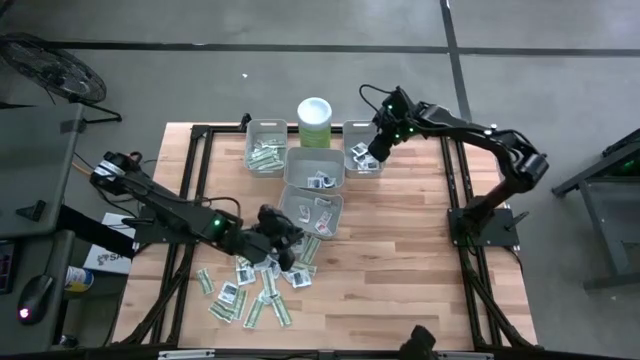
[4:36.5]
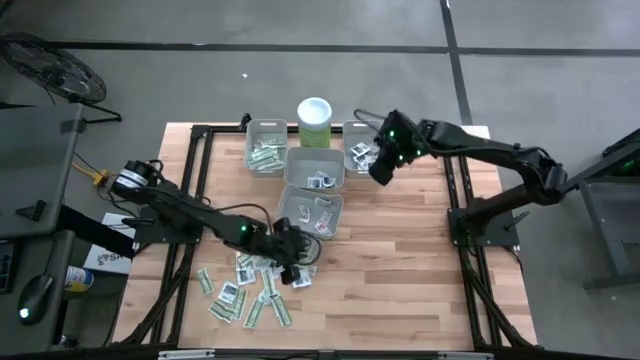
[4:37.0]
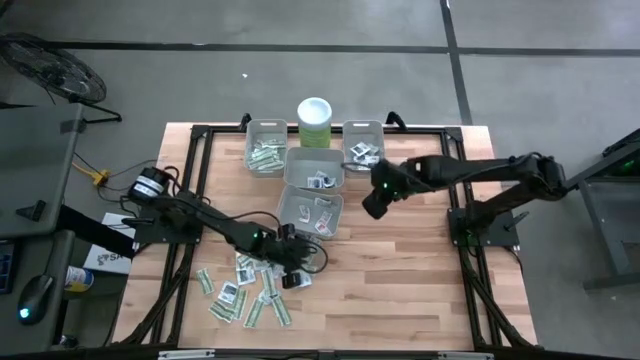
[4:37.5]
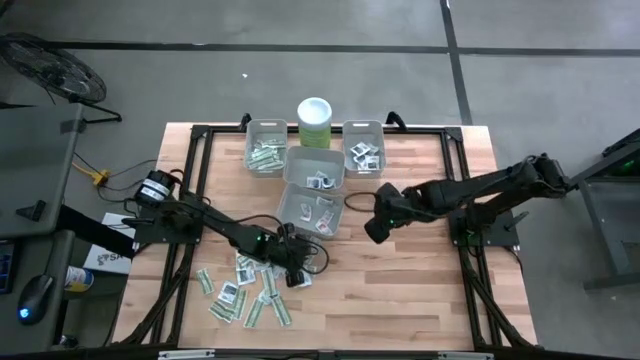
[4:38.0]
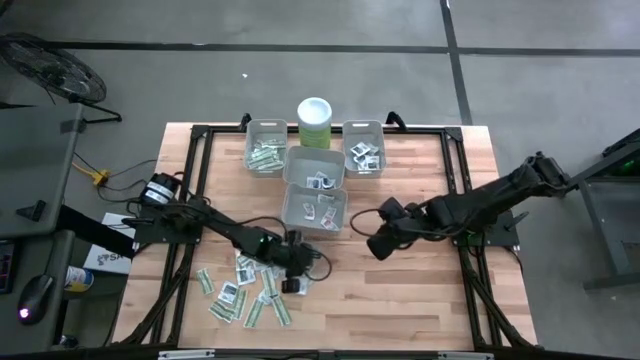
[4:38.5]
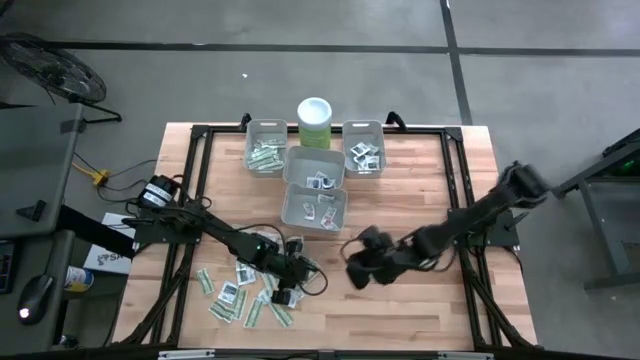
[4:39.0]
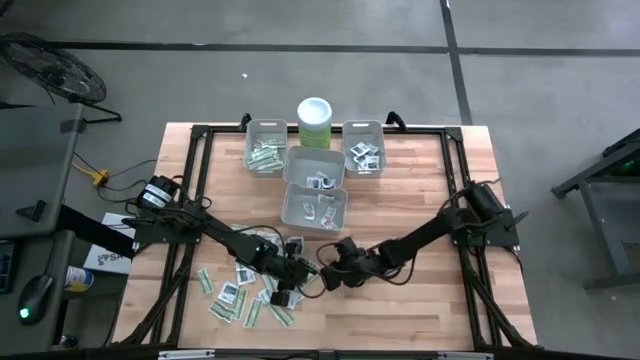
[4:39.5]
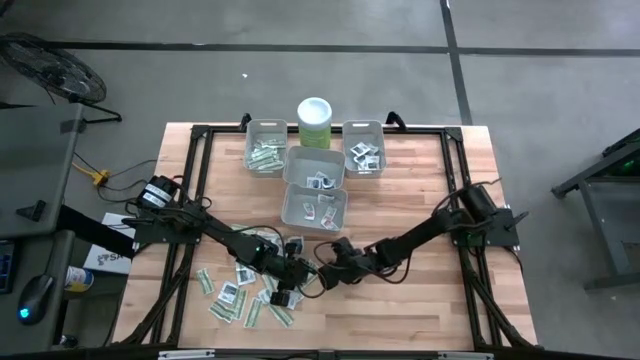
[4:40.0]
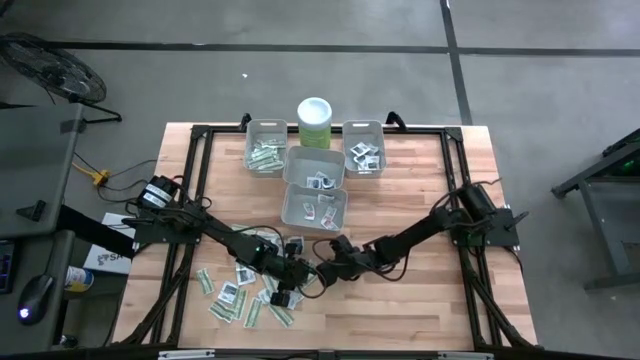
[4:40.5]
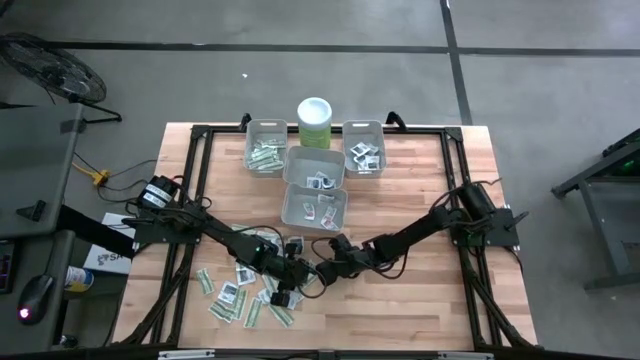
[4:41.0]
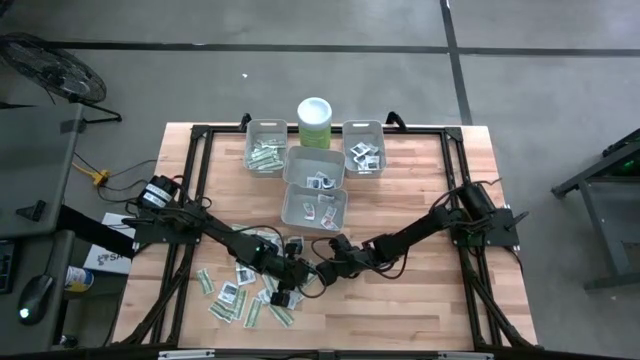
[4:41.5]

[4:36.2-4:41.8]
Task: Pick & Place First Aid Supplies
Put the bandage pack into the left bin

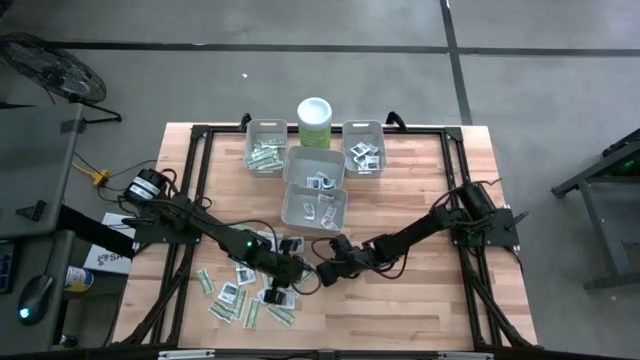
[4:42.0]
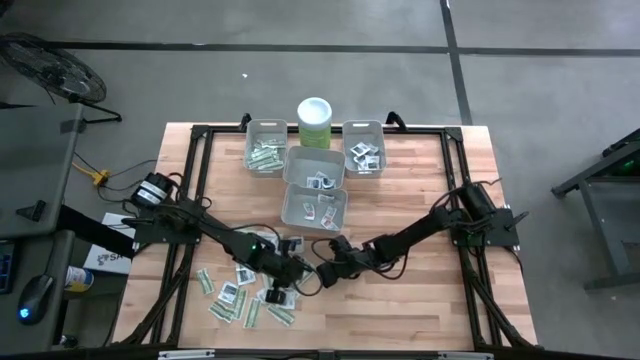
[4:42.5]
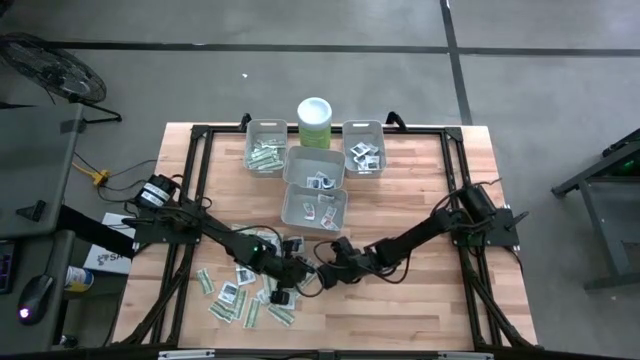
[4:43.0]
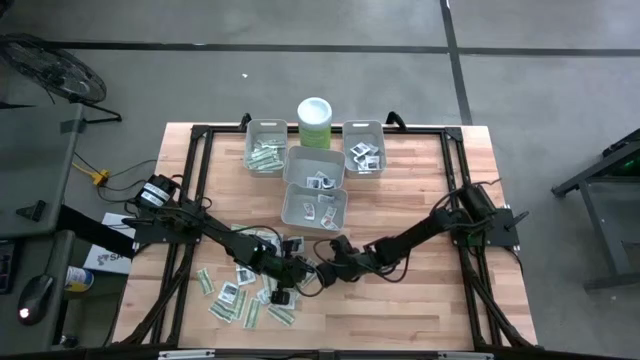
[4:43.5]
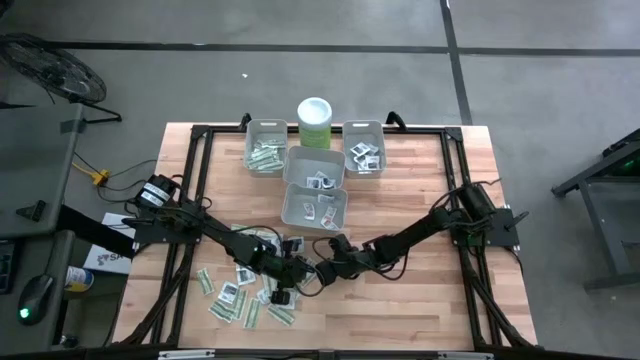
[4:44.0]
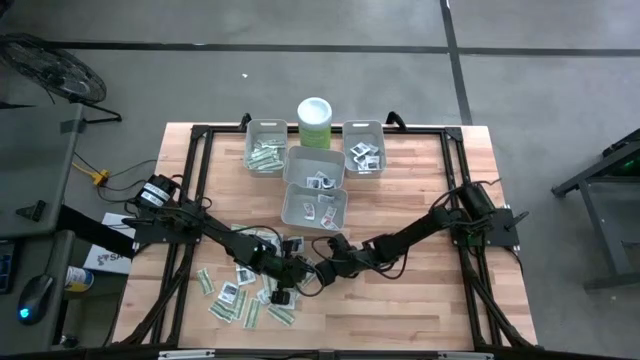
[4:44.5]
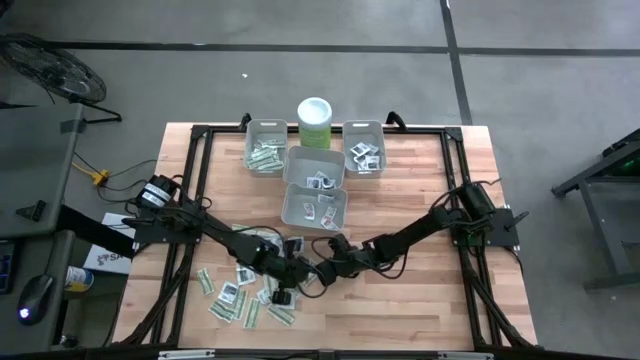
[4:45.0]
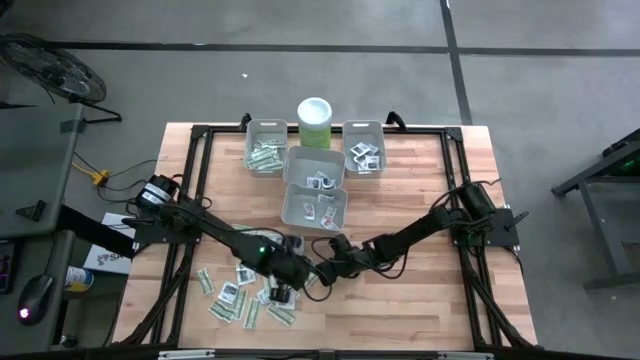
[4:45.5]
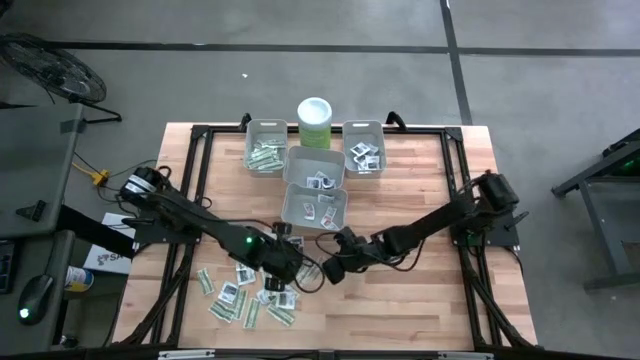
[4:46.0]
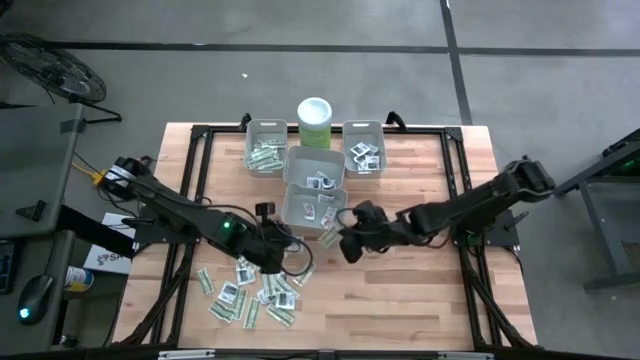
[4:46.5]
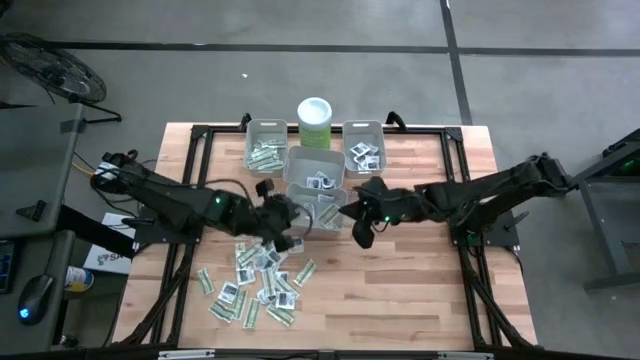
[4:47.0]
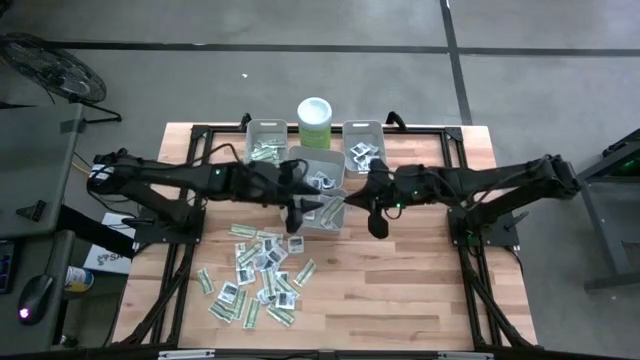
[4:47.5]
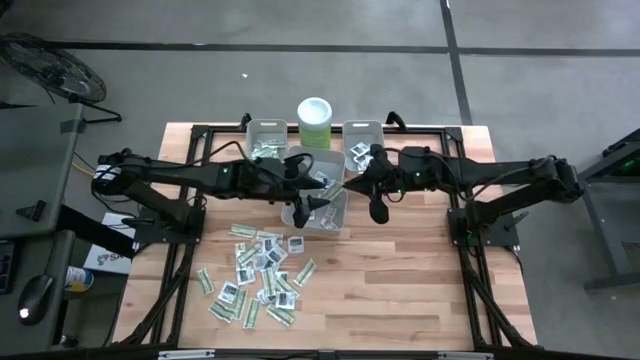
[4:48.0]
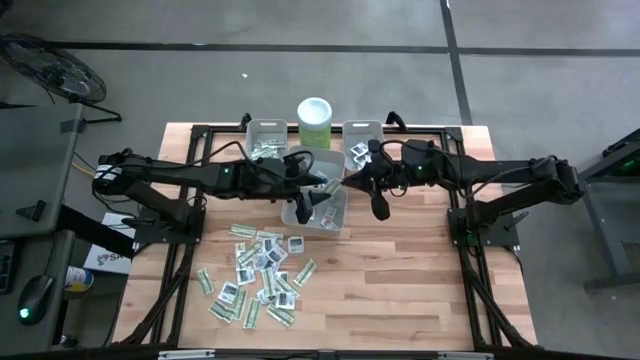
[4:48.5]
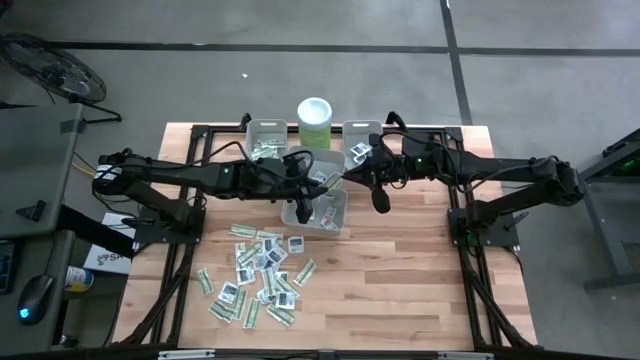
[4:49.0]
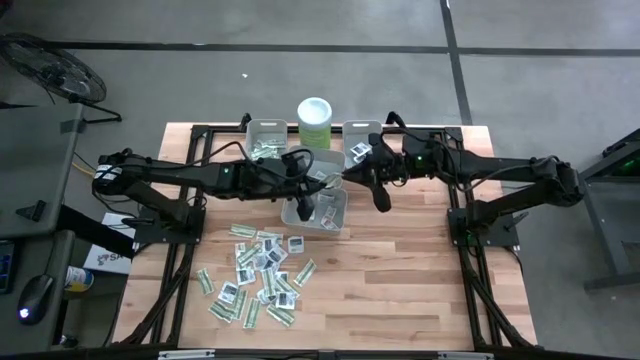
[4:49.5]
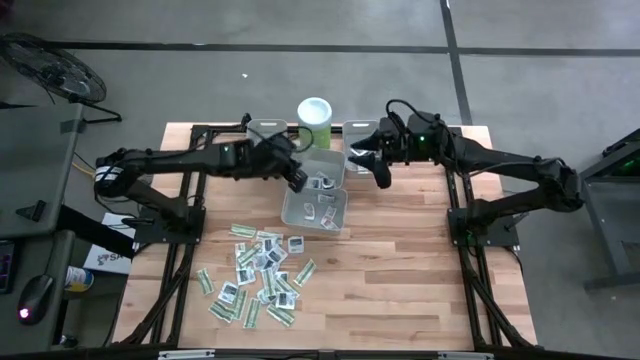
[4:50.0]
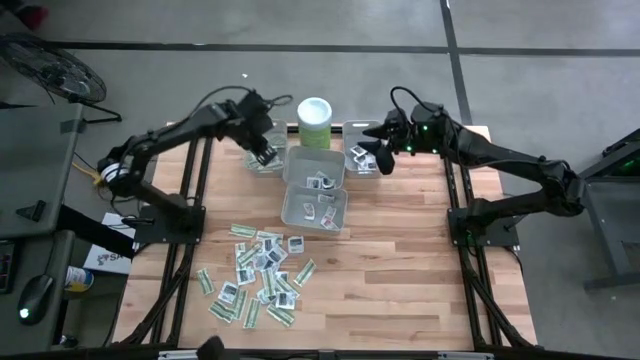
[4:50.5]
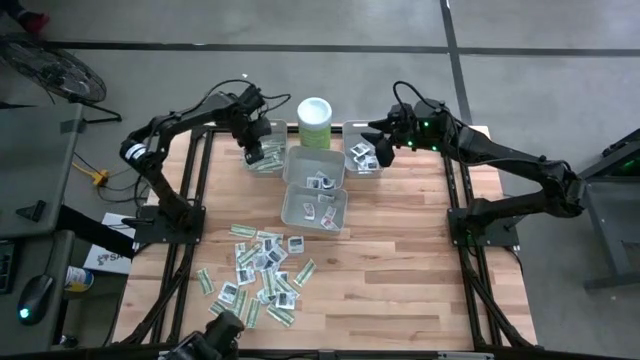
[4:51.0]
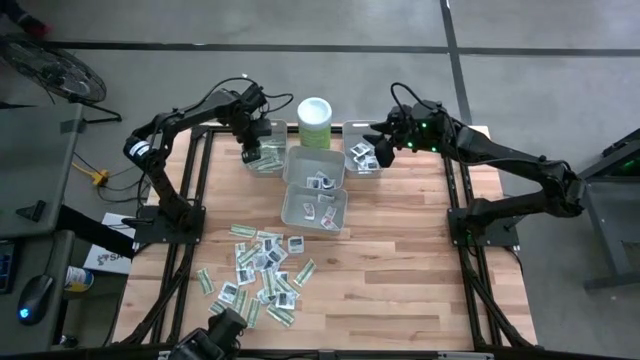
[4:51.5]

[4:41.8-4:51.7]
Put the bandage pack into the left bin

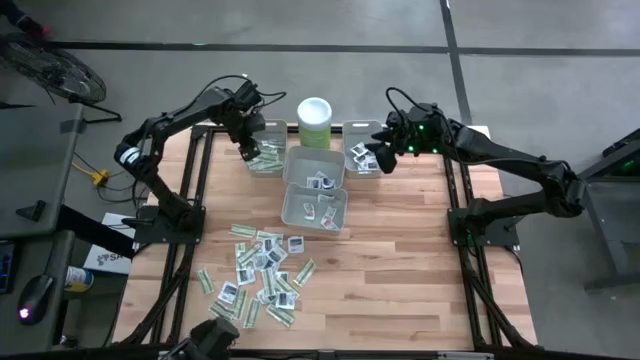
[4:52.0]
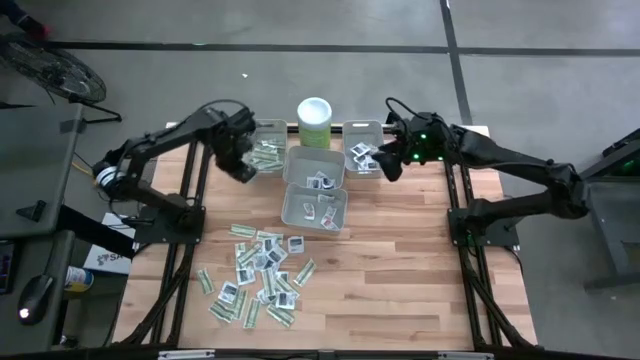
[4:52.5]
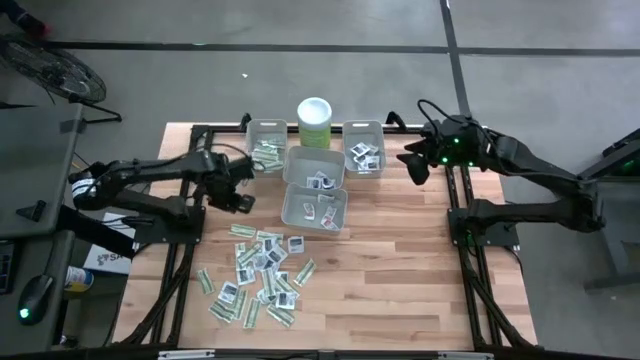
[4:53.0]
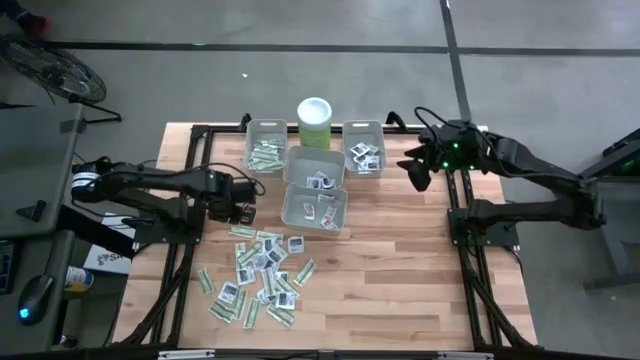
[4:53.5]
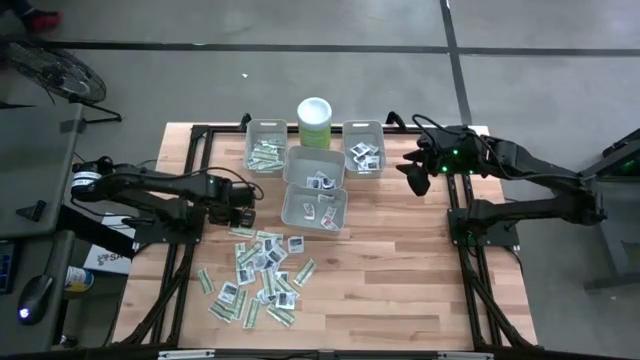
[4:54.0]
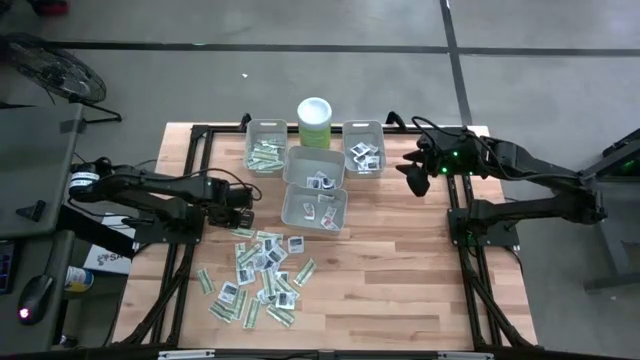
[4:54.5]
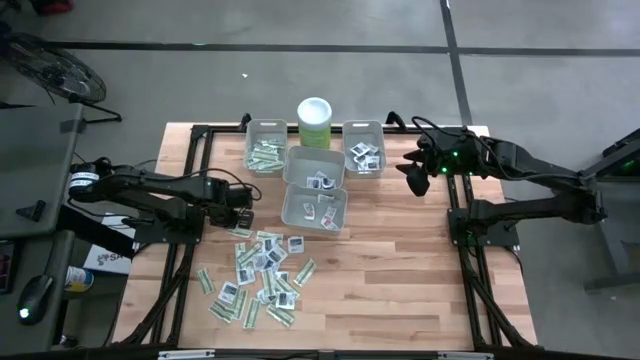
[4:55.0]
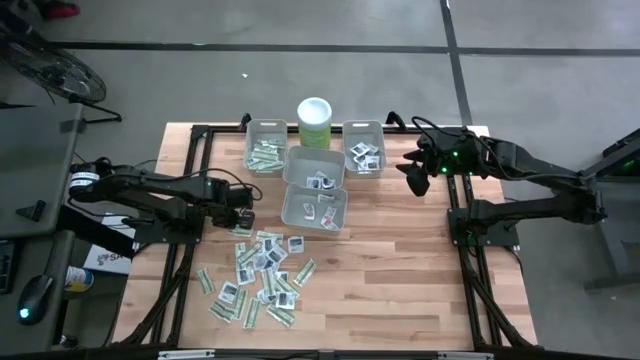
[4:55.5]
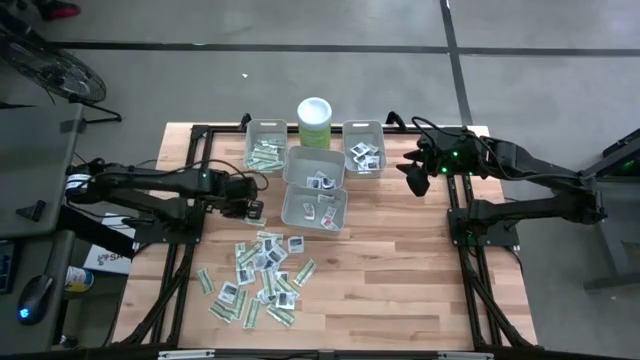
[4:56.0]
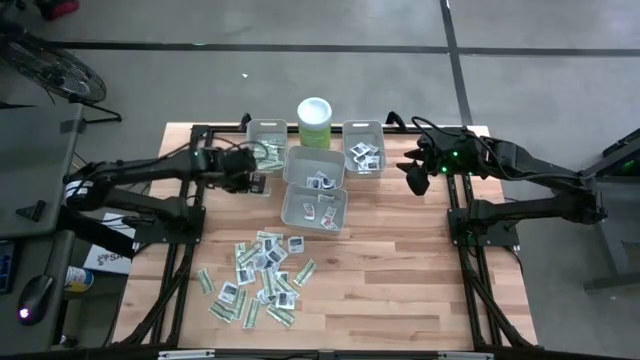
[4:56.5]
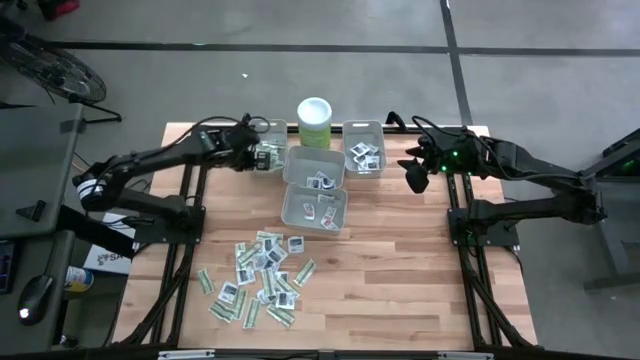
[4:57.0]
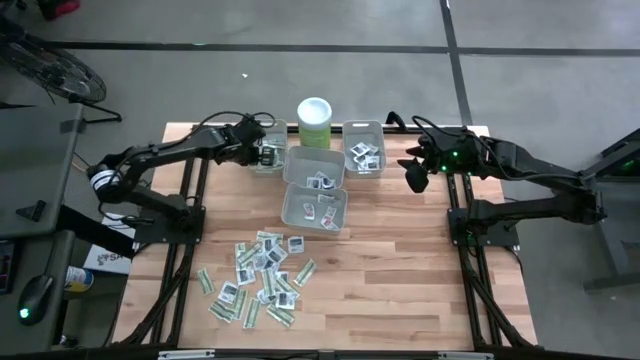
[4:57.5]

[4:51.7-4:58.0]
Put the bandage pack into the left bin
